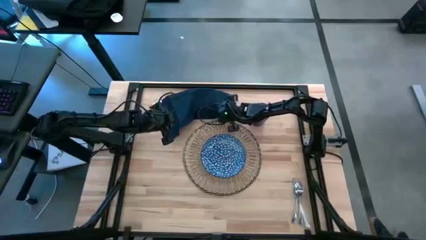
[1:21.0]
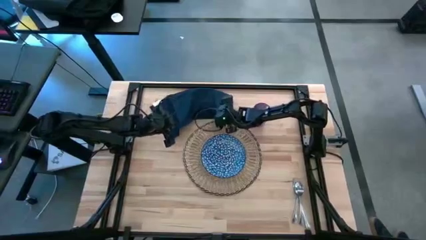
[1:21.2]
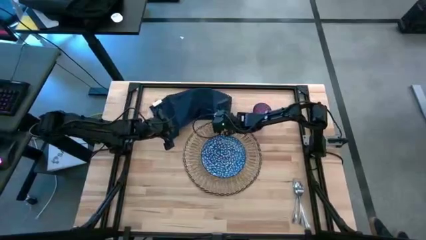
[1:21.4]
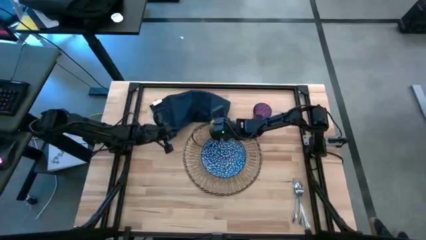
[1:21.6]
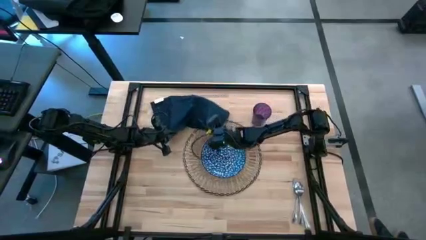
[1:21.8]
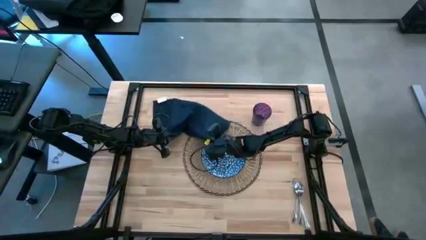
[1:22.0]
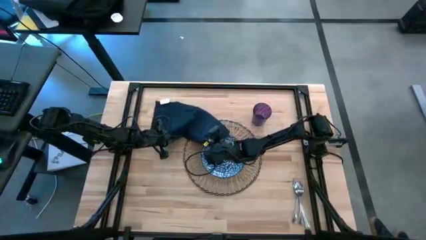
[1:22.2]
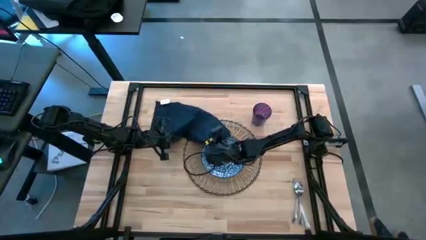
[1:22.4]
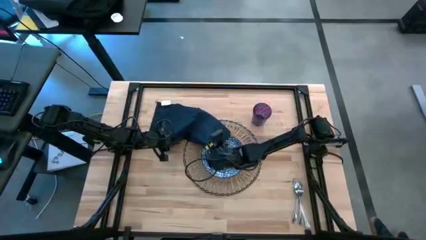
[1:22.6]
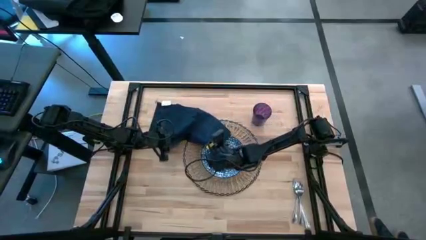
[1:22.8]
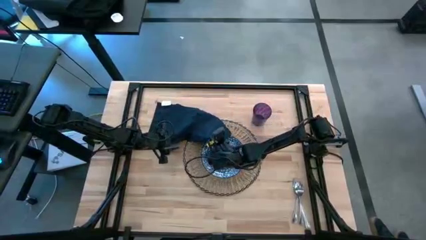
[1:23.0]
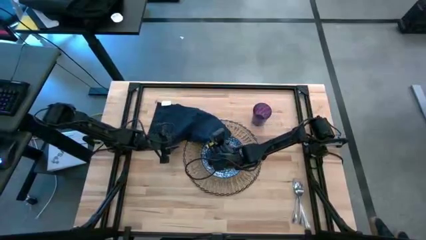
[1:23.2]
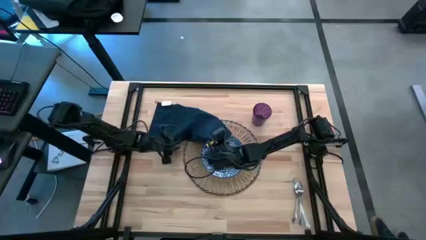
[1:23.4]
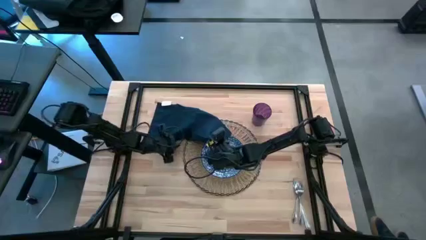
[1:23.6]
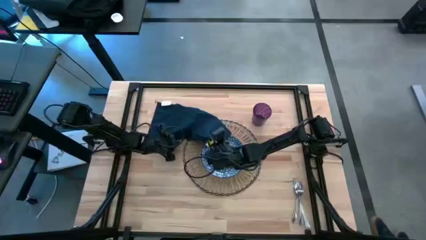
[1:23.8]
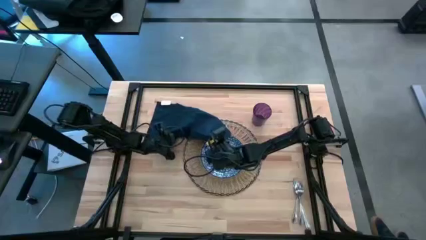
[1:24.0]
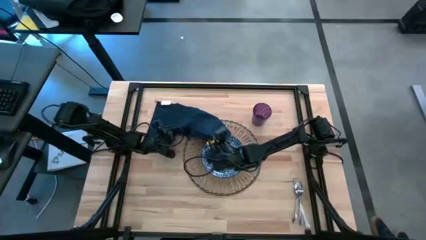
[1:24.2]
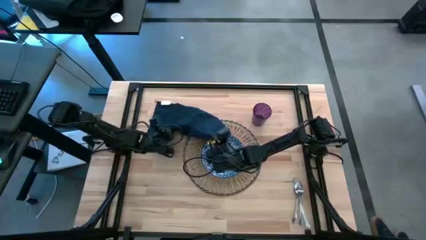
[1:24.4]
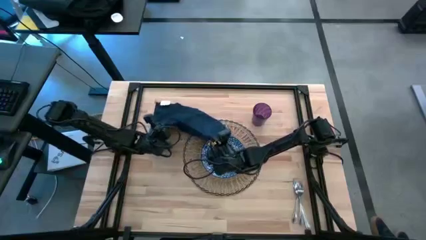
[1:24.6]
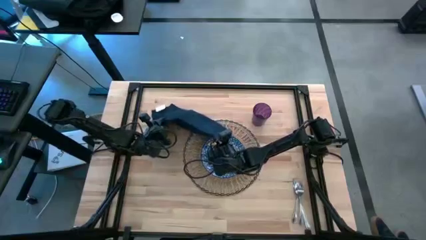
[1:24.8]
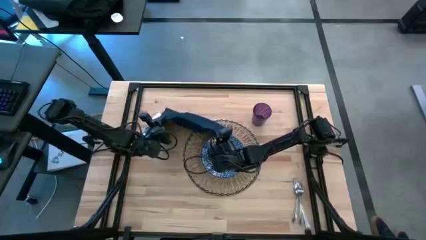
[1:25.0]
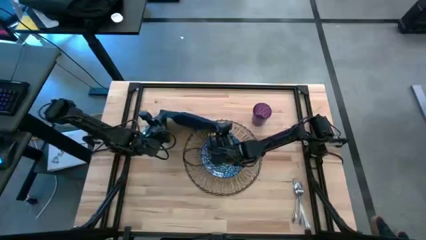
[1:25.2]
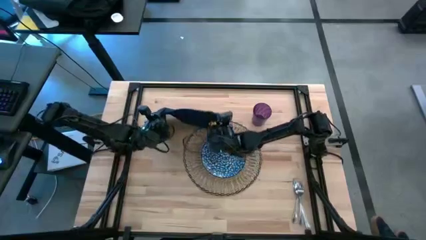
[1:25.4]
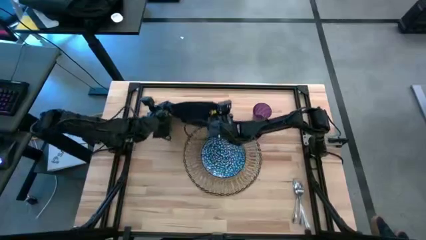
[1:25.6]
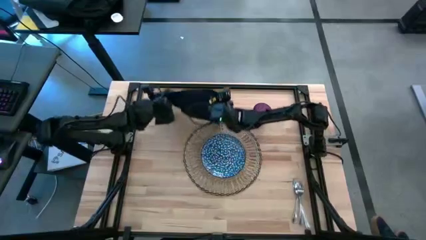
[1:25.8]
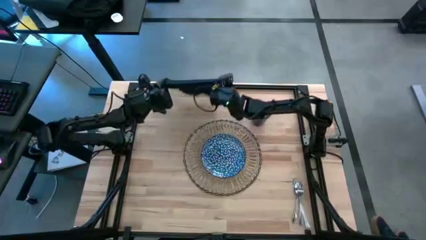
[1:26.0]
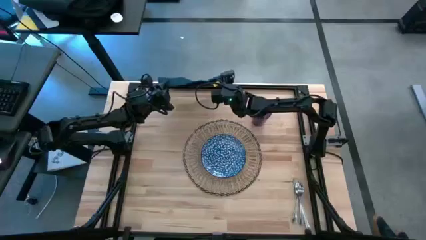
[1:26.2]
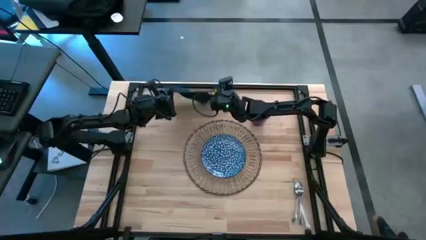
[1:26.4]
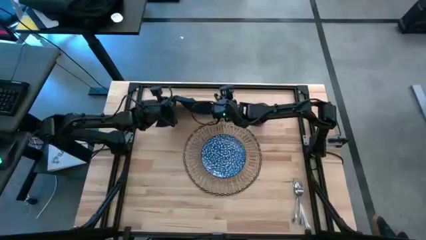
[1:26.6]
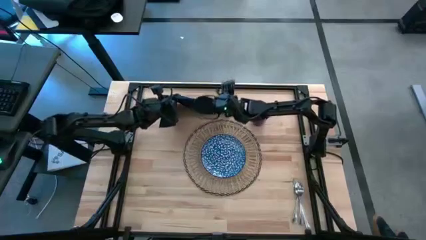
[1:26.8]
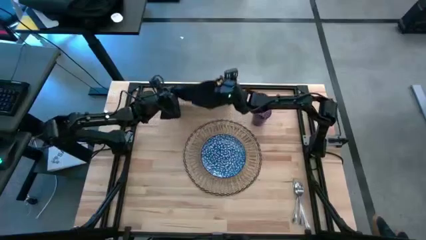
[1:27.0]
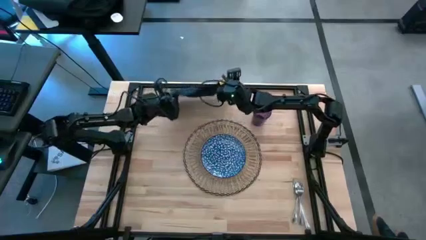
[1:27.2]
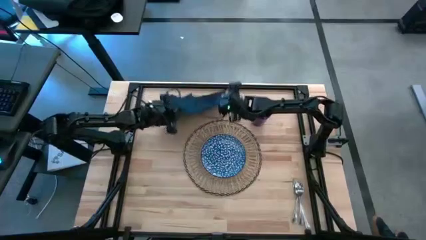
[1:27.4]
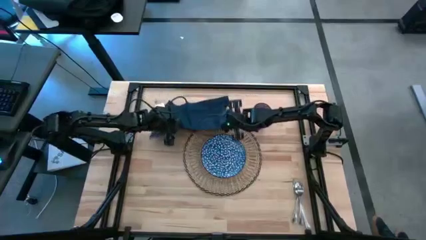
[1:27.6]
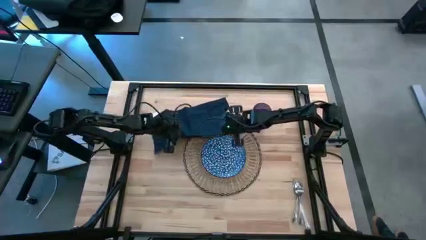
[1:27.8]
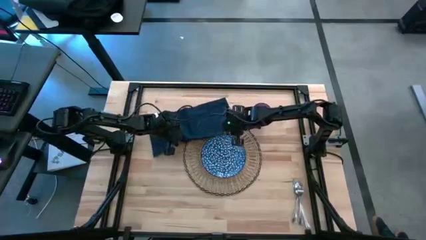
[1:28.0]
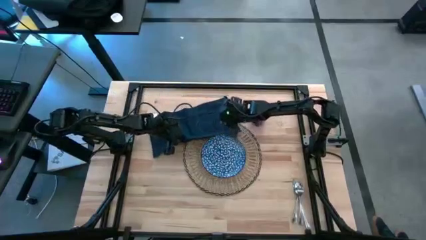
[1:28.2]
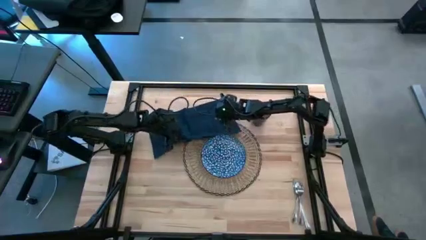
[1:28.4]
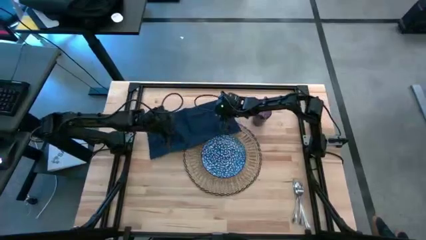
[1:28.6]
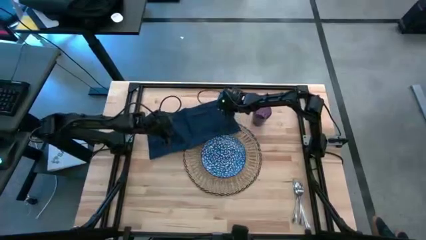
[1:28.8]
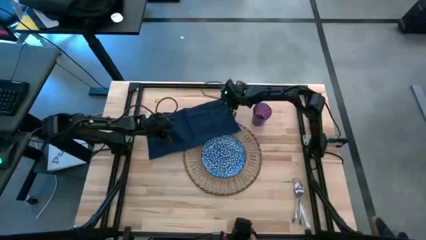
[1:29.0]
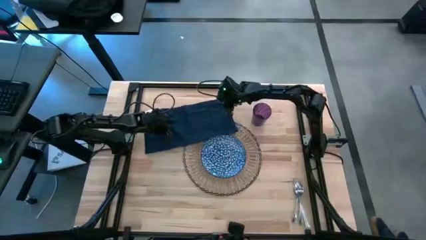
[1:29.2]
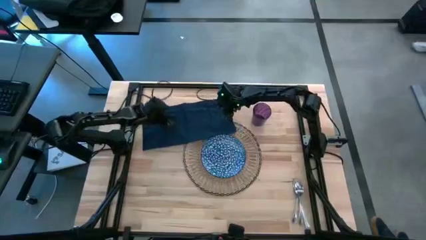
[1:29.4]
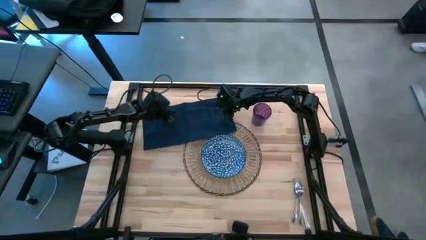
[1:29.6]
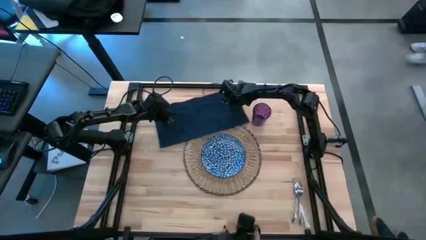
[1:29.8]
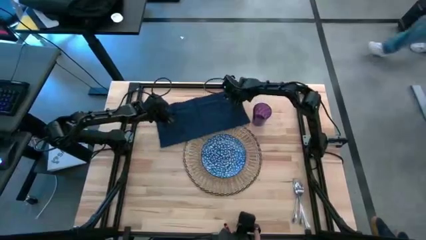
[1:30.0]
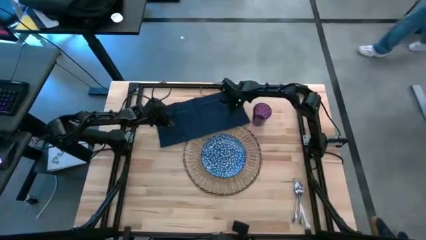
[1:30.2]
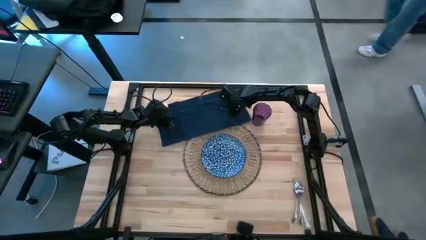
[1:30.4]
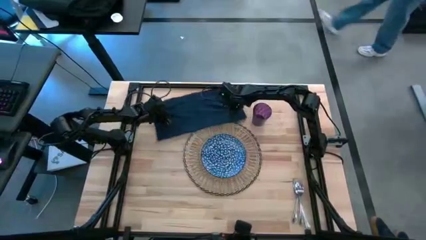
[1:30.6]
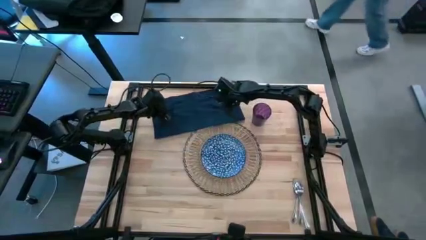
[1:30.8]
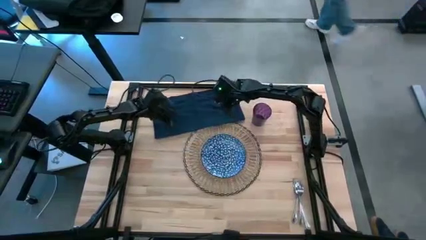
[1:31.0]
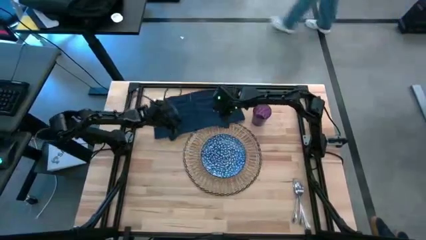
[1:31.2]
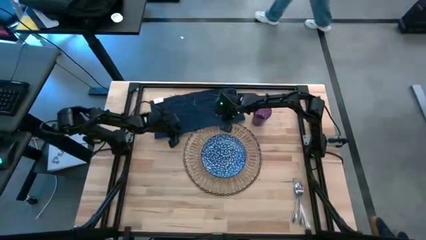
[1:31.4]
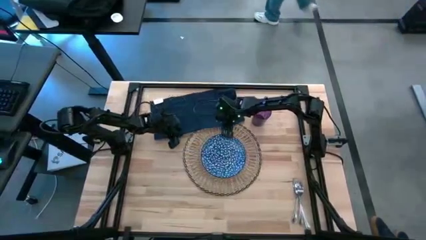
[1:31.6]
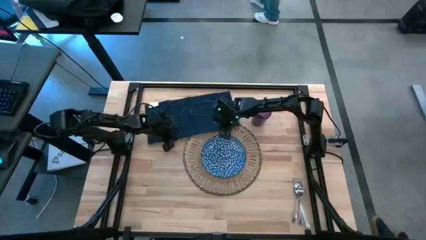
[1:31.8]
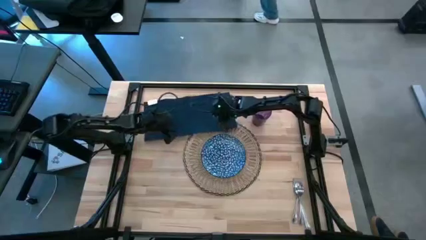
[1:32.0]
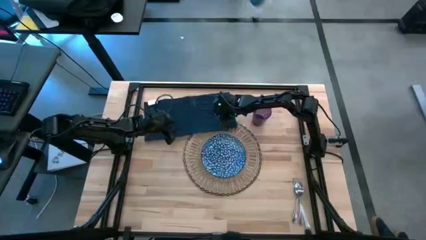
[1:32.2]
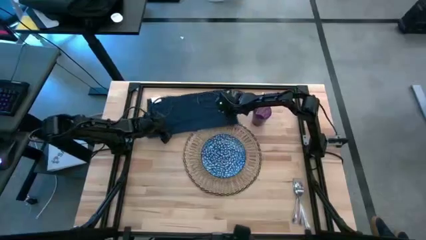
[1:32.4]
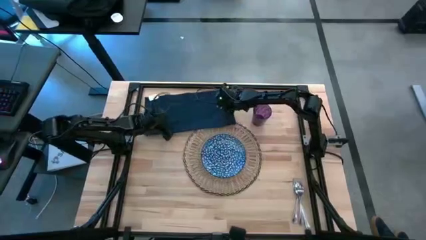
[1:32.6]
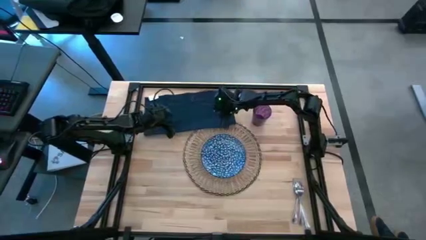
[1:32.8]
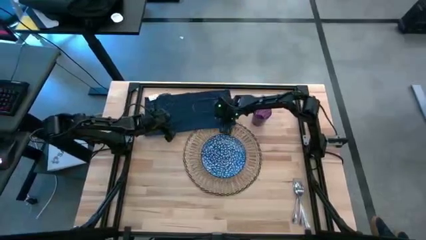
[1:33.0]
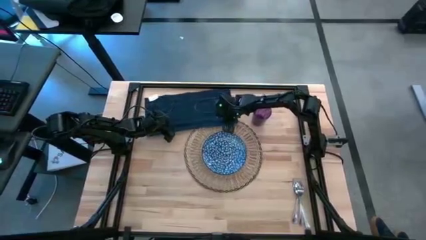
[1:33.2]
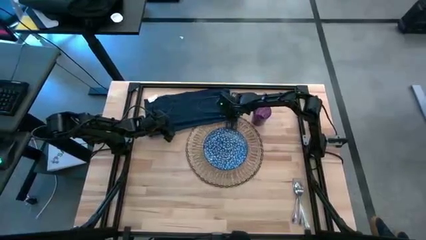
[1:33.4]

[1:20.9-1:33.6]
Task: Set table place
Fold the blue table napkin

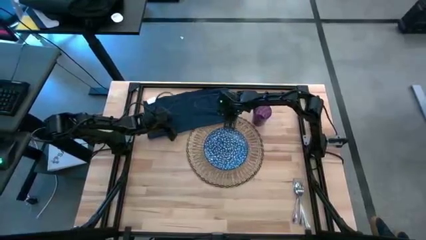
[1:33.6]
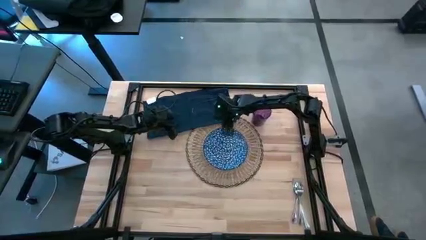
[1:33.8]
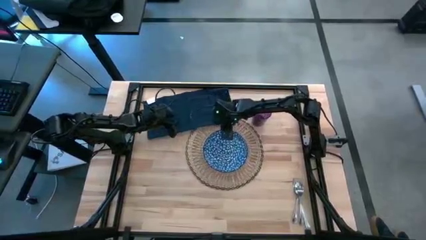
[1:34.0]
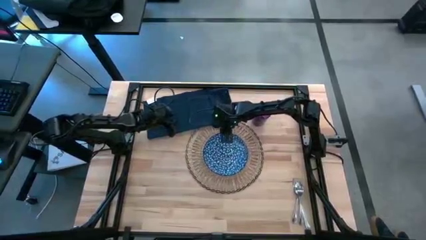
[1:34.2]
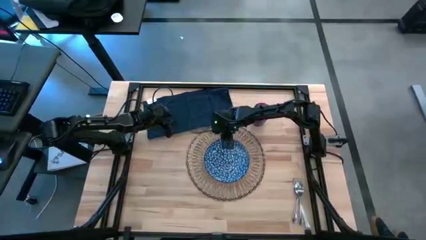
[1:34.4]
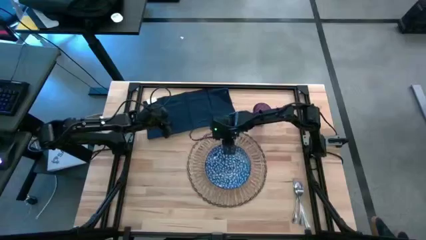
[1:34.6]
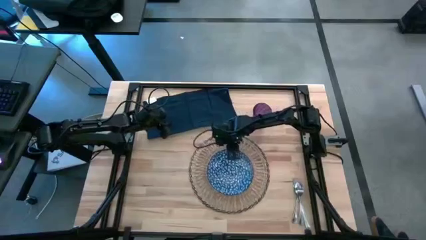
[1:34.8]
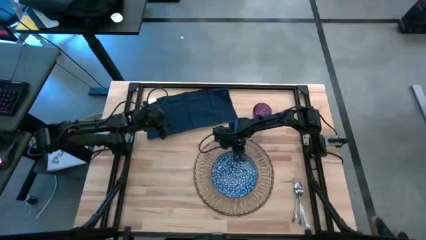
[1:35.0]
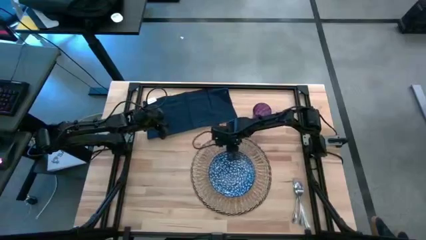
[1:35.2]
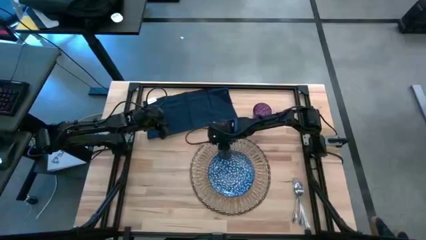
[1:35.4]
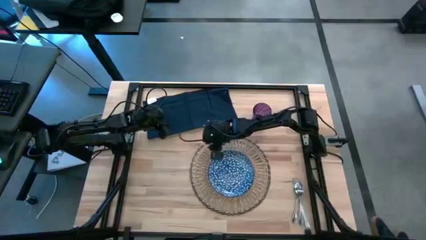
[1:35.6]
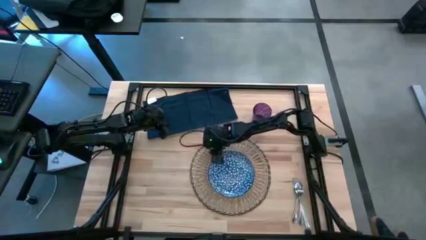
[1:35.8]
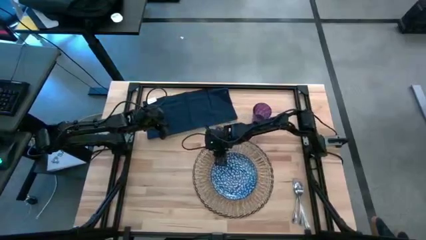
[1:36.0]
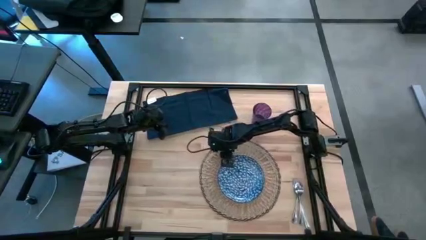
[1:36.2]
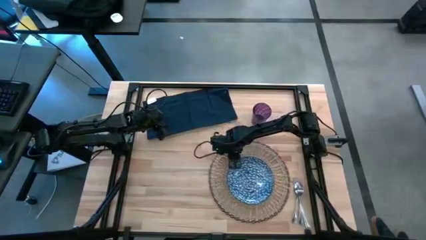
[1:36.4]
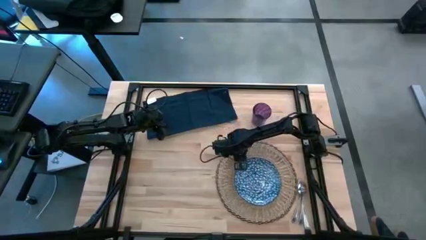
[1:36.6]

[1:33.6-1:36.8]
Move the table mat to the bottom right of the table

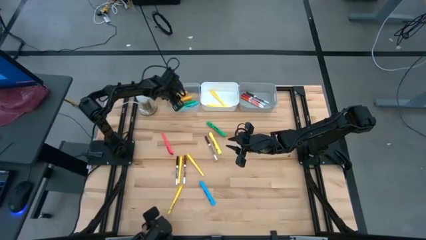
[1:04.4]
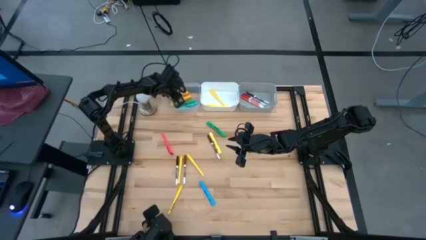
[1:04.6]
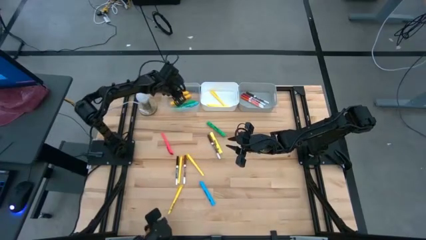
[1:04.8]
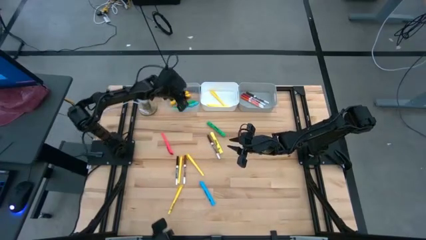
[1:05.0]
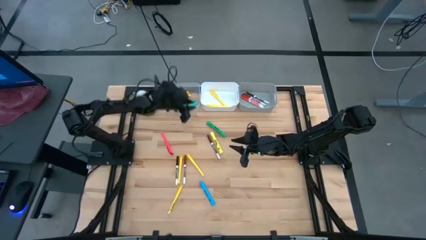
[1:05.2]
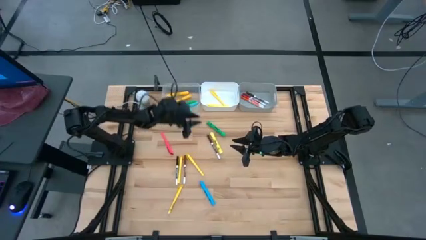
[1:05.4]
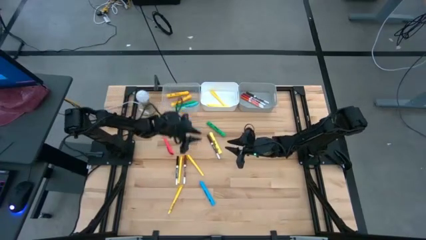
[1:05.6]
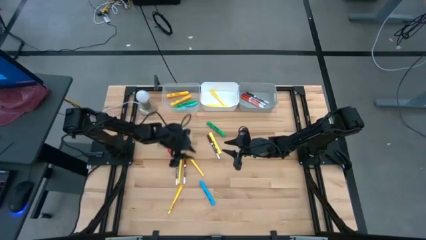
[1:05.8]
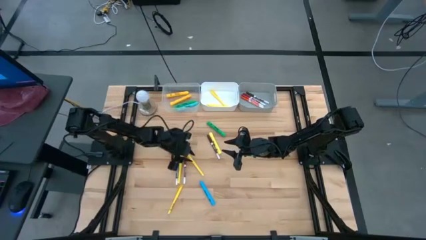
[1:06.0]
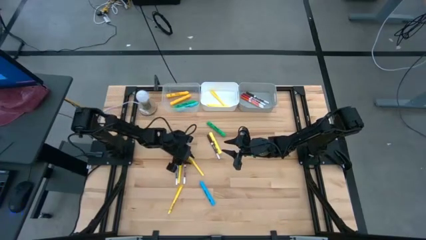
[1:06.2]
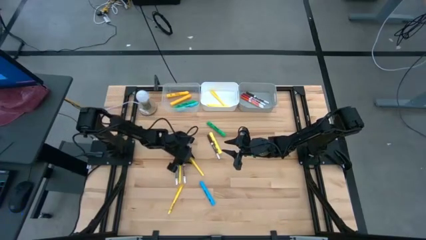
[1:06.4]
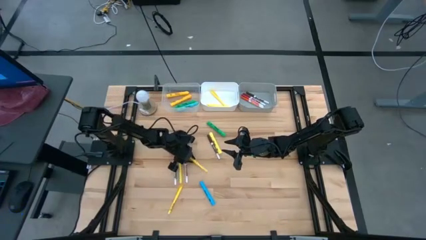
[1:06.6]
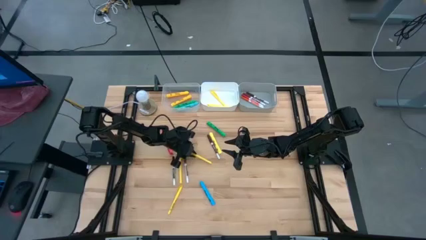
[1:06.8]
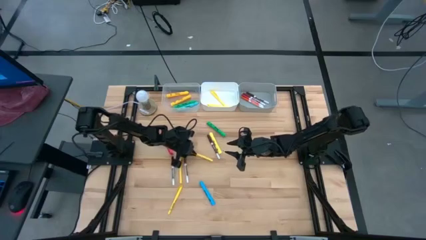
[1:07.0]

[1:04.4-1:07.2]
Task: Pick & Place Markers
Put the yellow pen into the white bin
